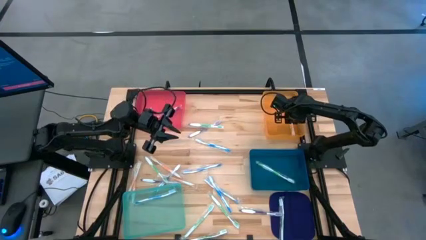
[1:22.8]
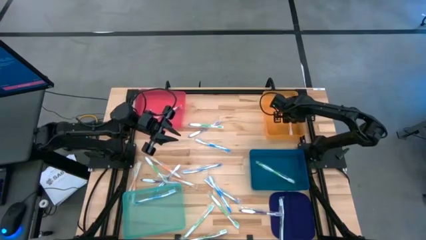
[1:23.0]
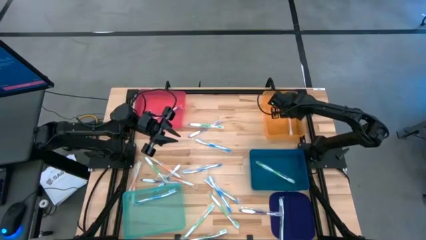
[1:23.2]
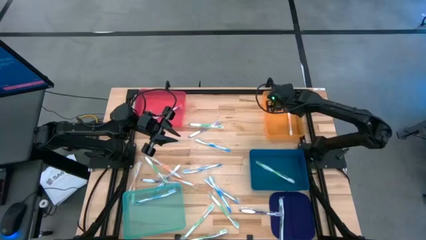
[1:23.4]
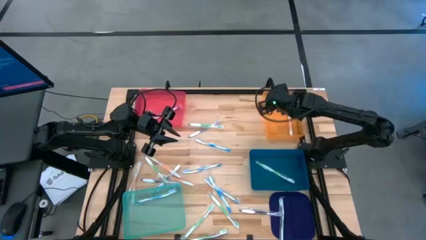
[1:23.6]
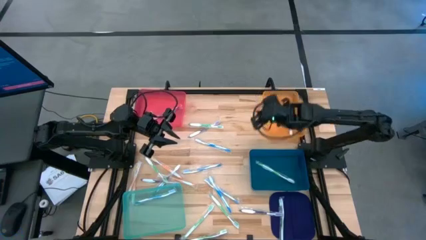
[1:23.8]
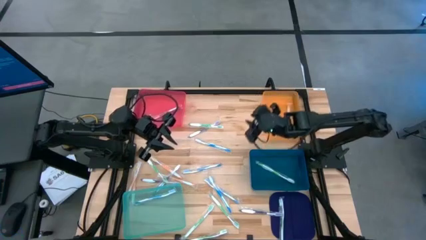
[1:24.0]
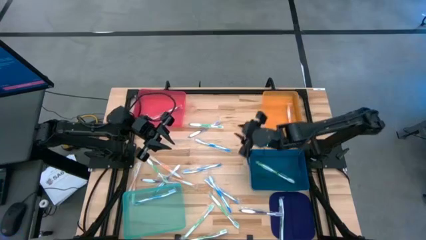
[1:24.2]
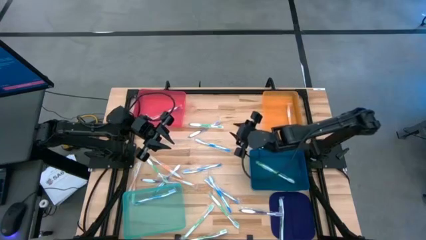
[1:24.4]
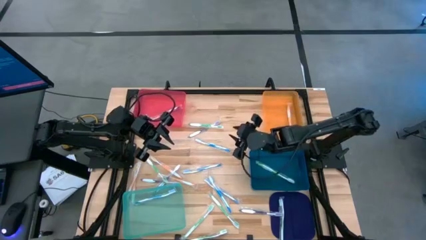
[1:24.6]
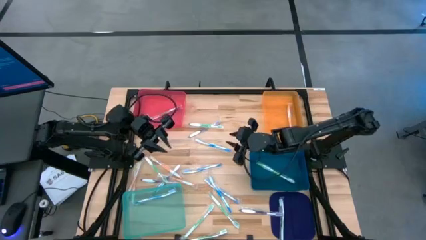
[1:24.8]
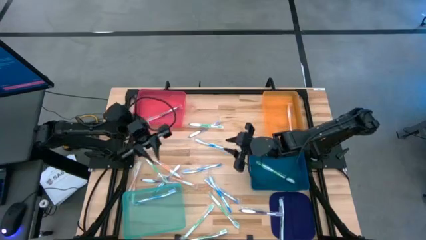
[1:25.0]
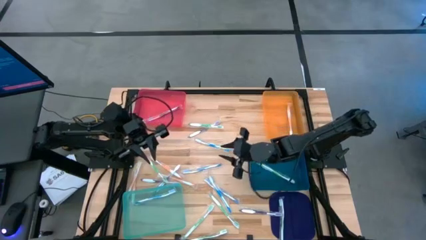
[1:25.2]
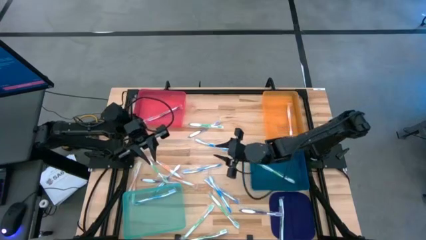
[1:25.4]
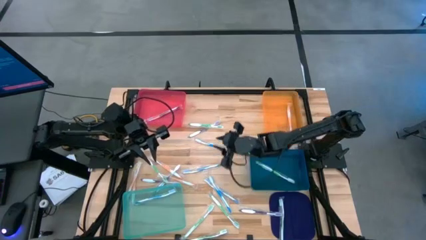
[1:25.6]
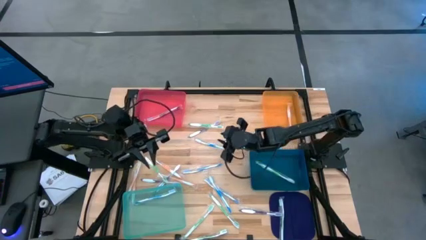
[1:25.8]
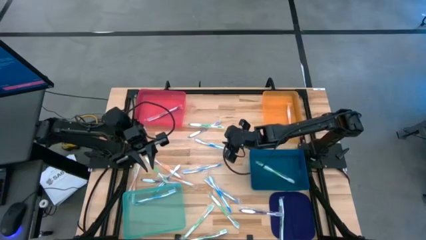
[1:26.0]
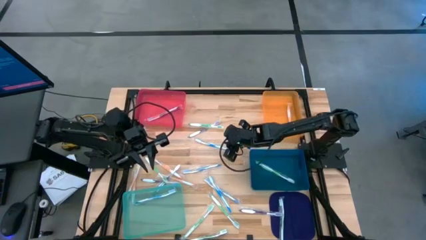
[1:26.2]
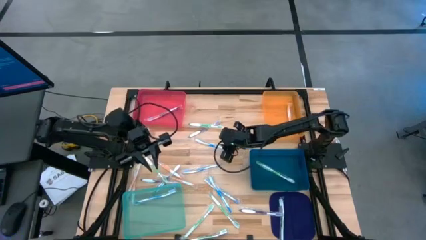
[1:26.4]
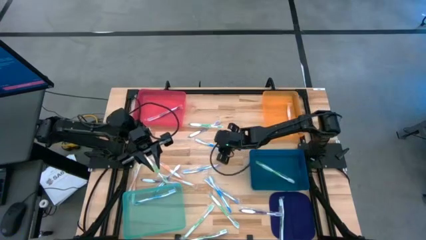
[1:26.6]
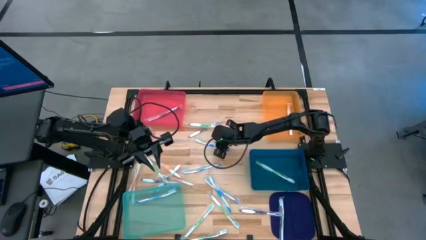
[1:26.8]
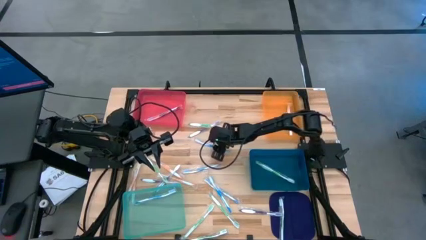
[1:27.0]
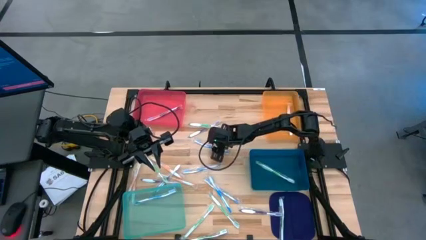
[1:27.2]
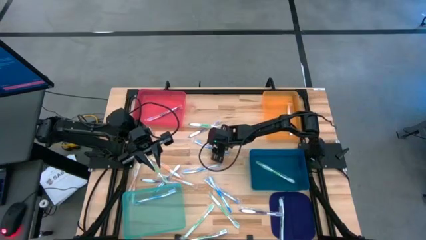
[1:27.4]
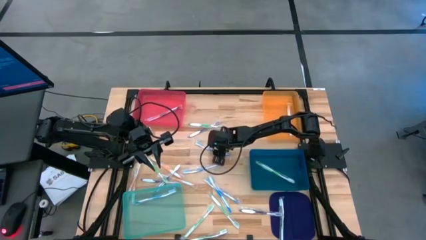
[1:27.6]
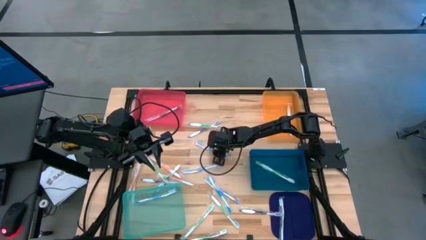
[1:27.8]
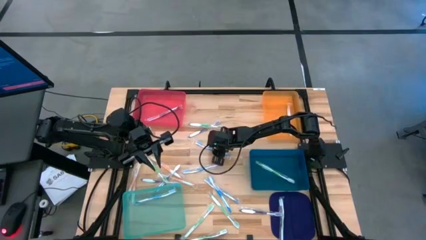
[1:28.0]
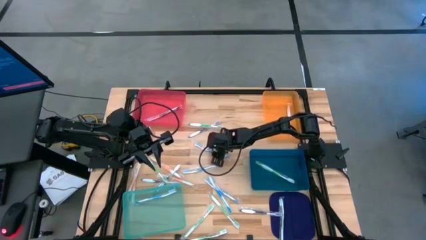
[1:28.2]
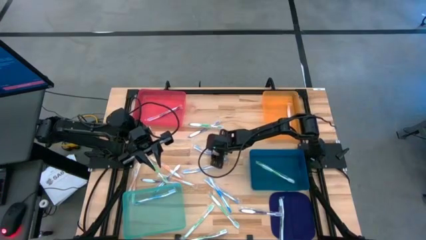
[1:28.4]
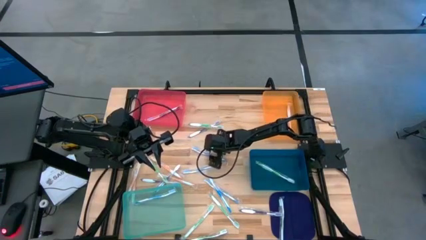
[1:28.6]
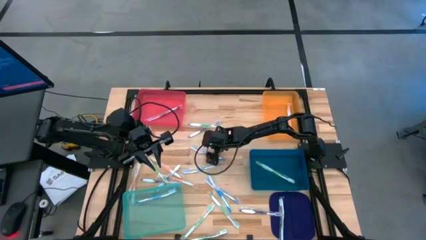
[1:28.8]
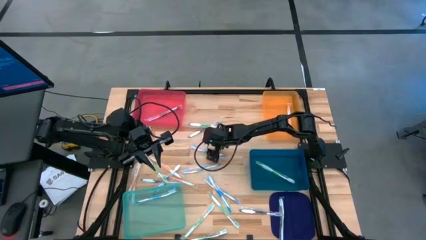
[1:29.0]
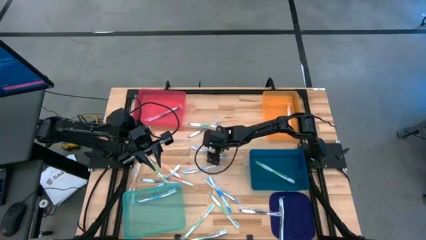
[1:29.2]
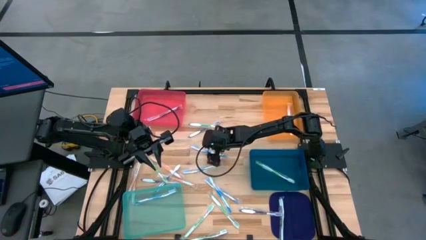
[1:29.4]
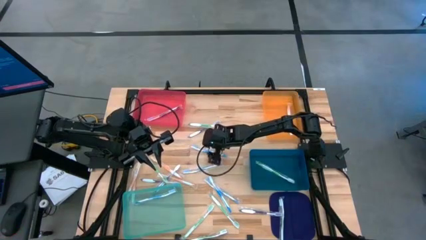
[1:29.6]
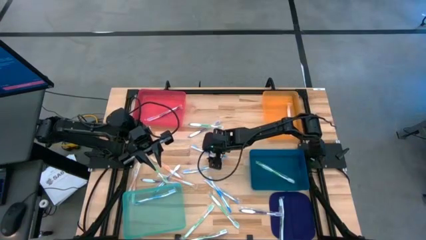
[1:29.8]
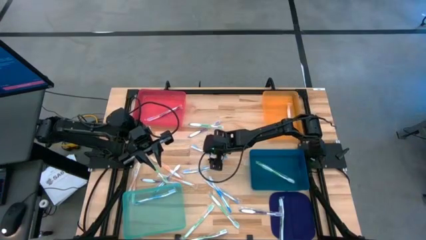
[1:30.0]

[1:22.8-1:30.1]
Task: Pick & Place Toothbrushes
Put the blue toothbrush into the green bin

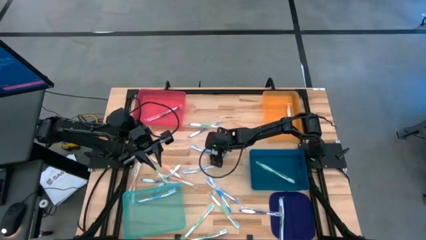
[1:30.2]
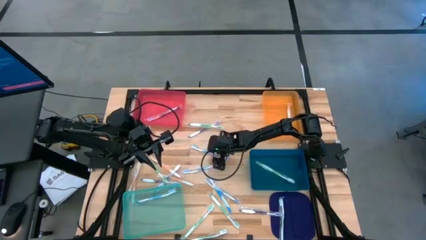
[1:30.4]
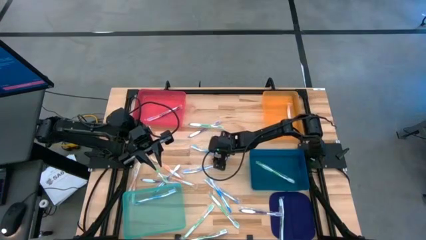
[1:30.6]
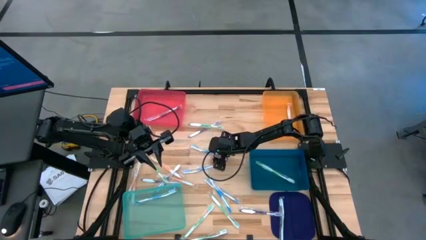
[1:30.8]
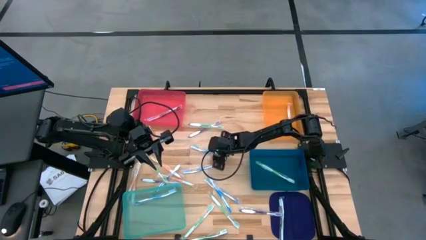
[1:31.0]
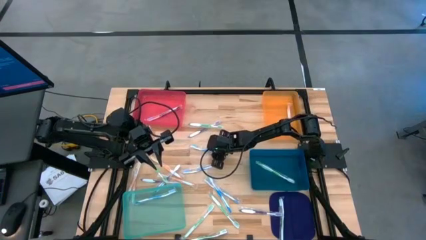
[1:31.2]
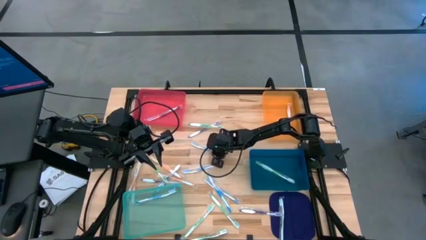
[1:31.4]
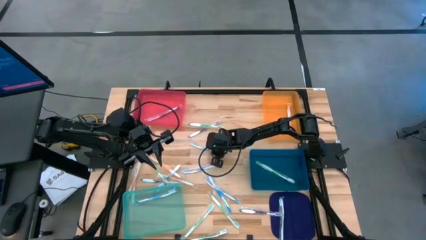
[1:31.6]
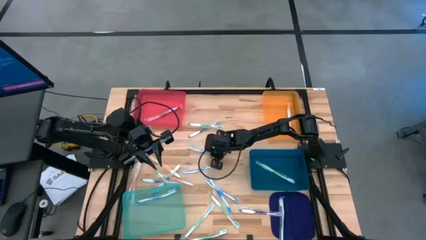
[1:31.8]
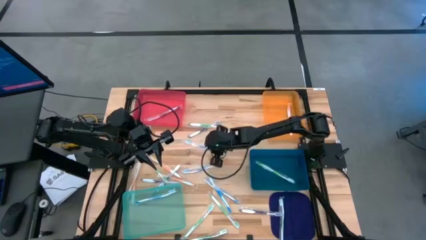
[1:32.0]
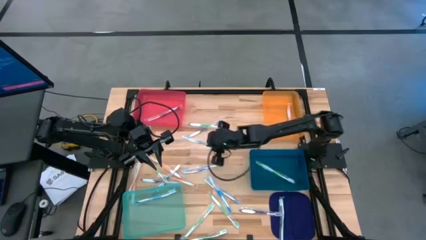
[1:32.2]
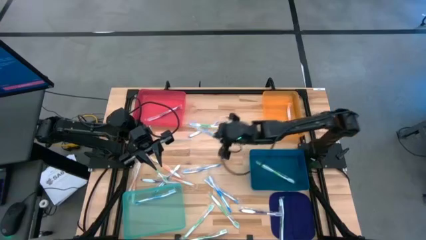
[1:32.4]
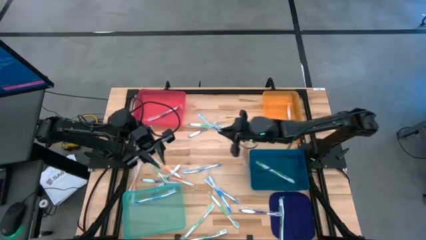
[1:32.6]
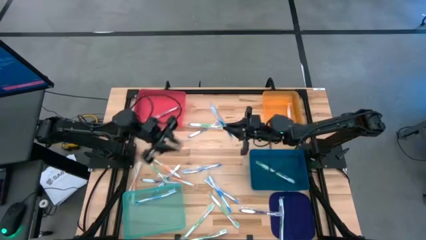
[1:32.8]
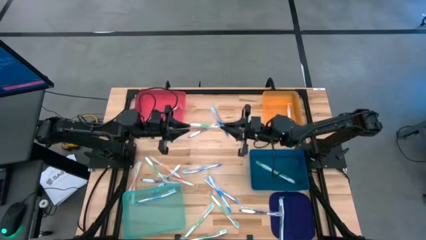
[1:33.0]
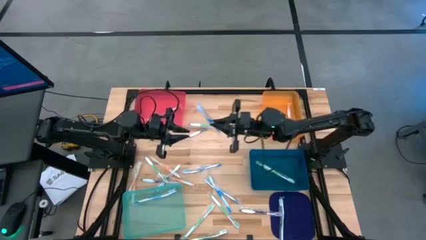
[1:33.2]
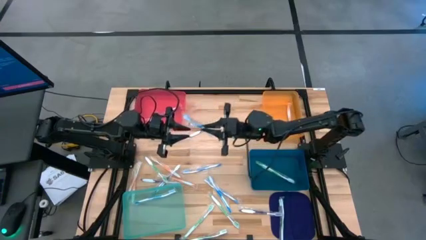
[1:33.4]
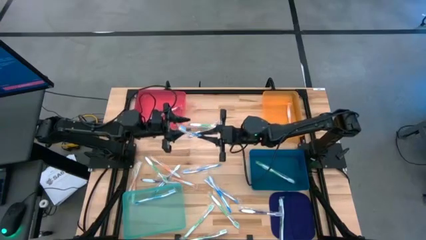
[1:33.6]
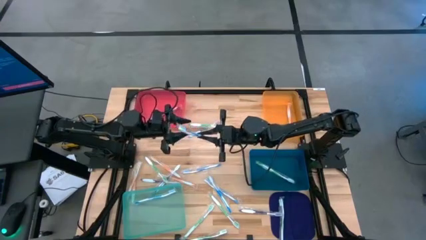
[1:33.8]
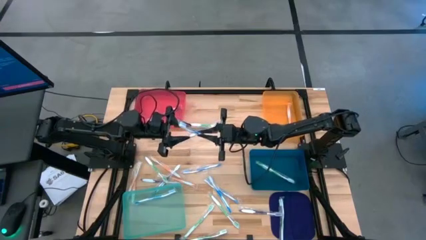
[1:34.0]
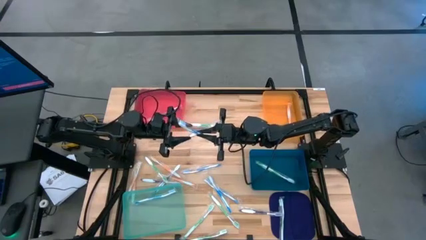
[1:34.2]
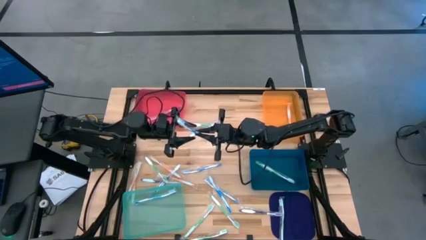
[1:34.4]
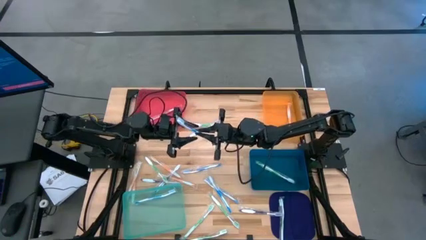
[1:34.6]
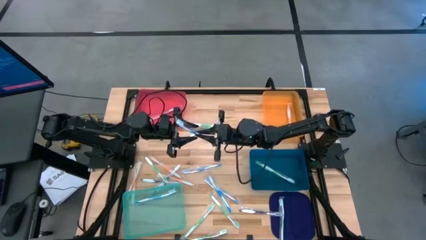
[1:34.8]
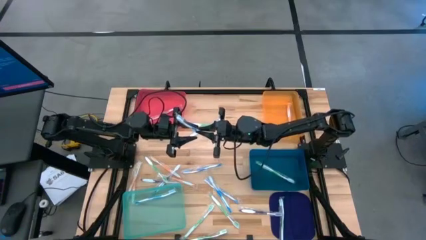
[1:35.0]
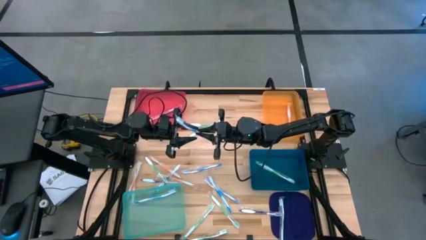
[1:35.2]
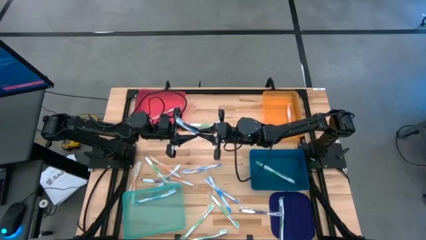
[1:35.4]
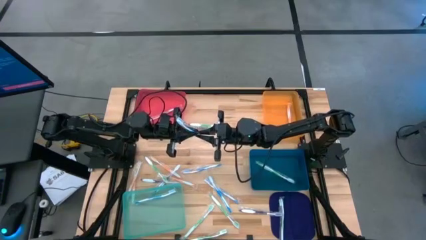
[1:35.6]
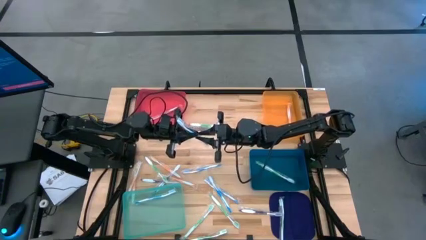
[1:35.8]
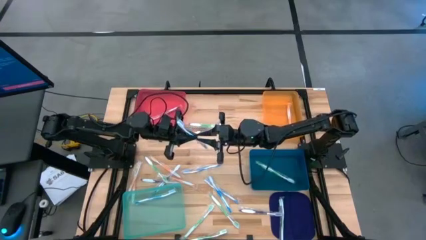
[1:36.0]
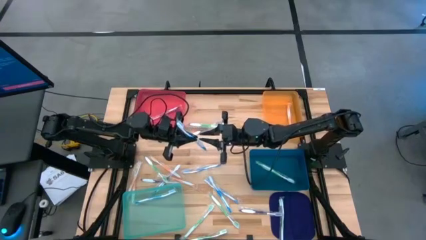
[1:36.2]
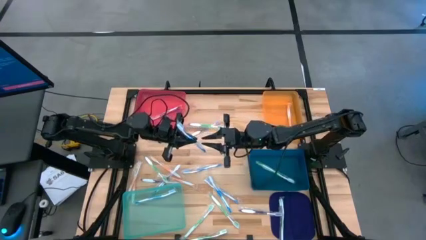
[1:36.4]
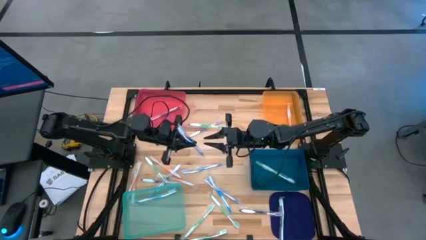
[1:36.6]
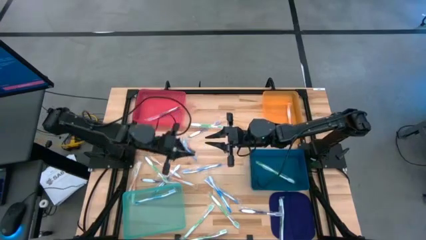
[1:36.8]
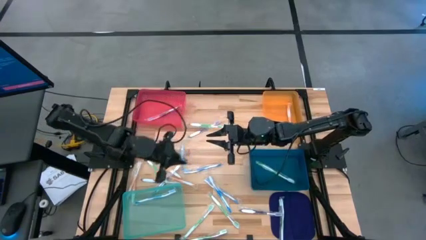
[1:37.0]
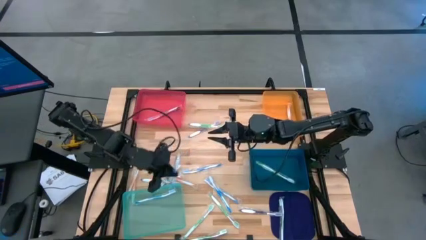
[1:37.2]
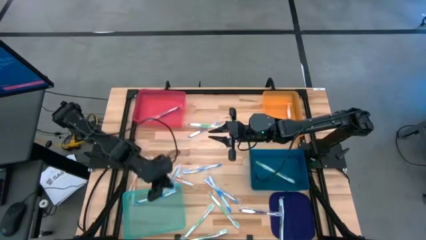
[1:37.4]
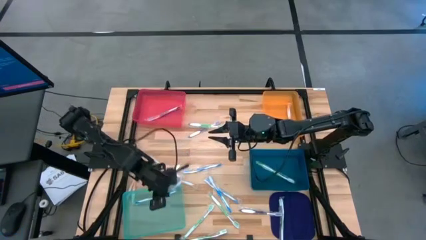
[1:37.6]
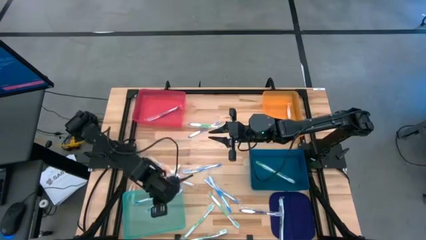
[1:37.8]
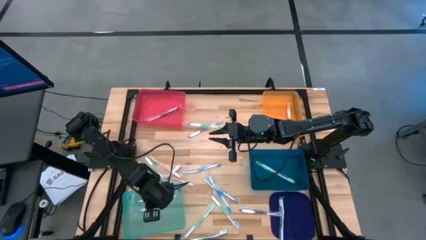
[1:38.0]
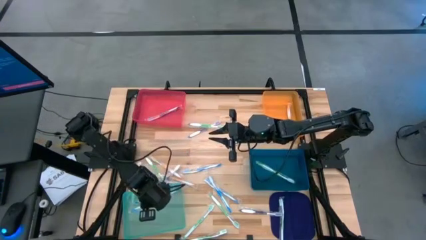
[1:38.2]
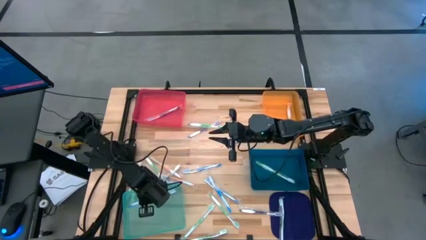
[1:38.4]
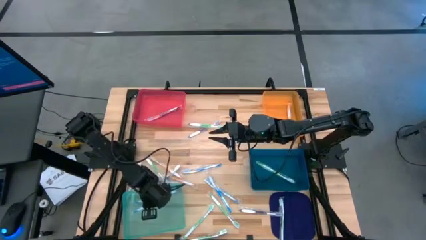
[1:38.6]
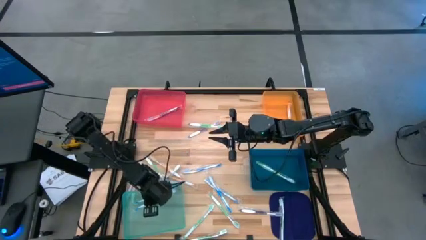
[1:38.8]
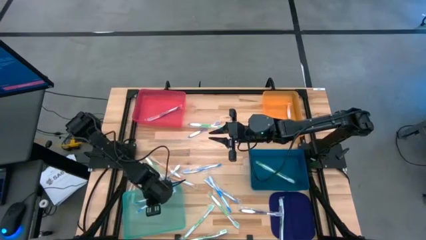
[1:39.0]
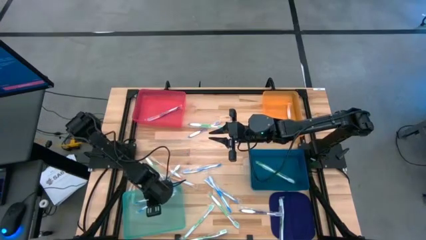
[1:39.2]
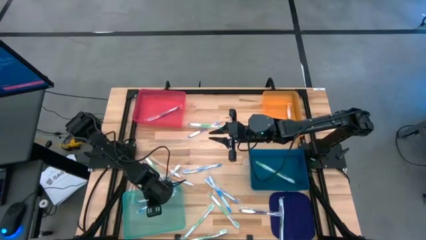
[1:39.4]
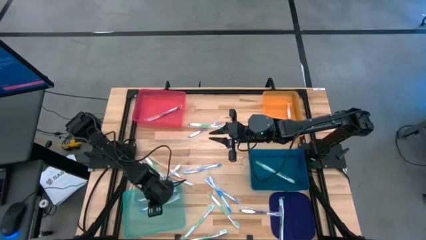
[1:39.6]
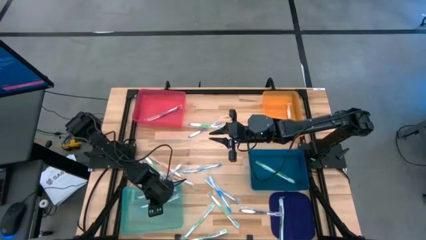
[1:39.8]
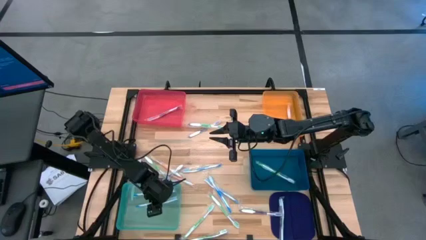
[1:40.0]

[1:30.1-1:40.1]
Put the blue toothbrush into the green bin
